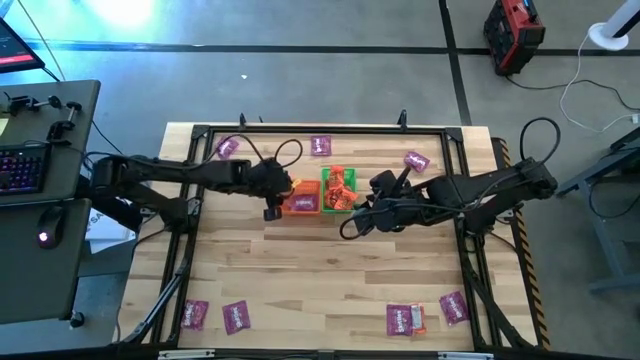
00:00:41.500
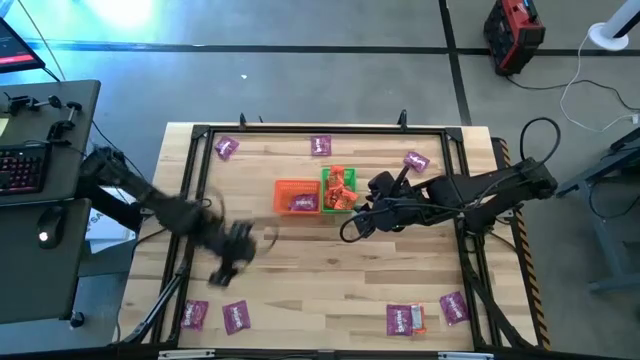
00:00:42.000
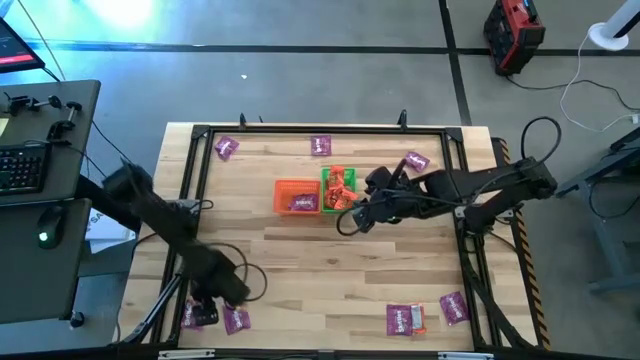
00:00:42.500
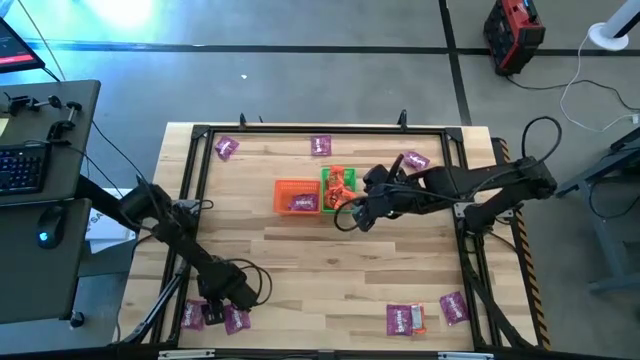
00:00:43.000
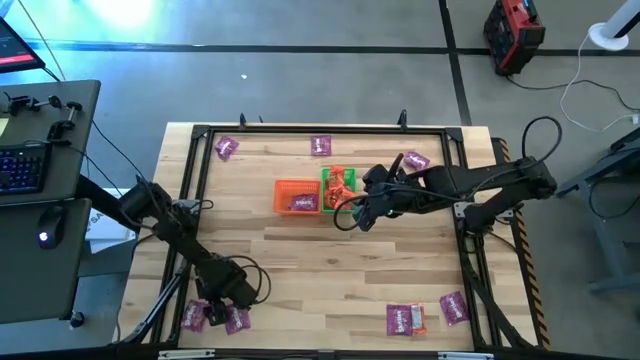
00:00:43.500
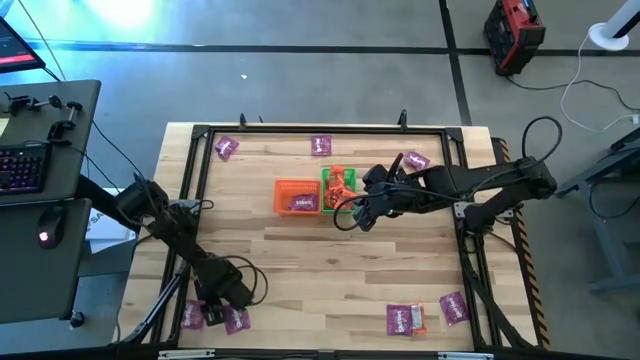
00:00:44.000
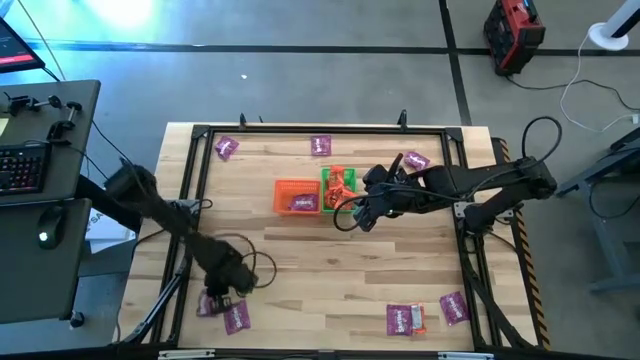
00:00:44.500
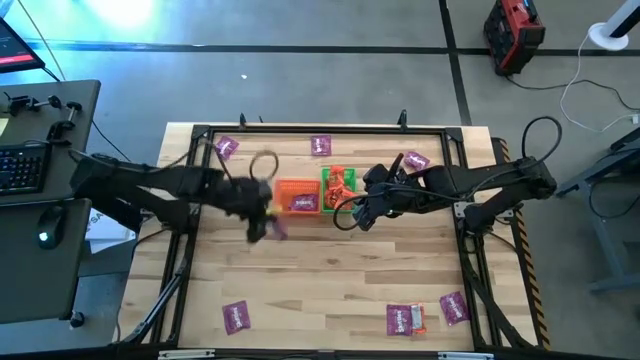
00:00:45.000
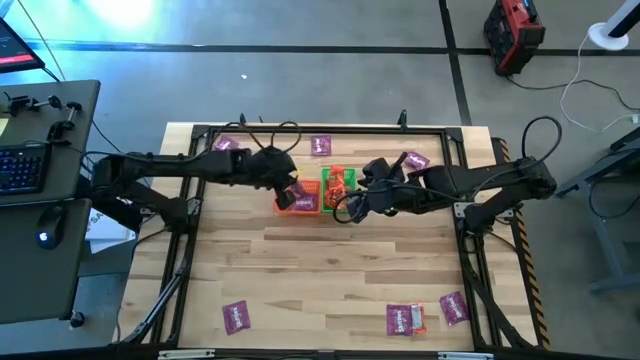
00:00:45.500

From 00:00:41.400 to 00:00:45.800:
Task: Sort candy by brand, put in halloween buckets
Put the violet candy into the orange bin

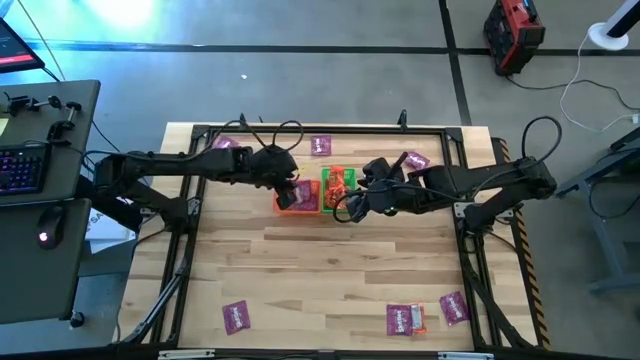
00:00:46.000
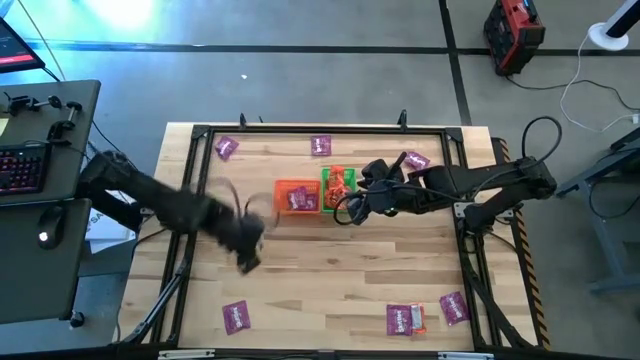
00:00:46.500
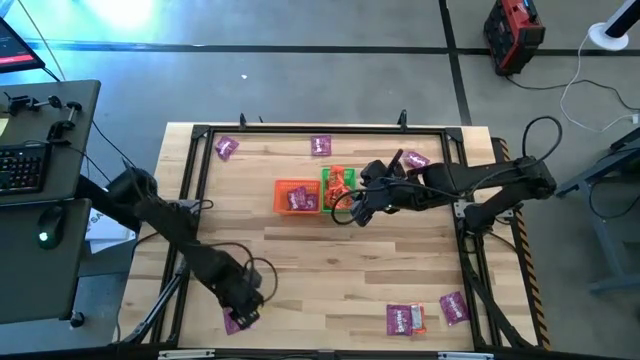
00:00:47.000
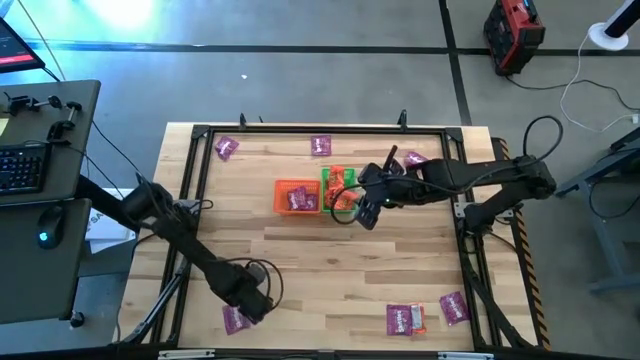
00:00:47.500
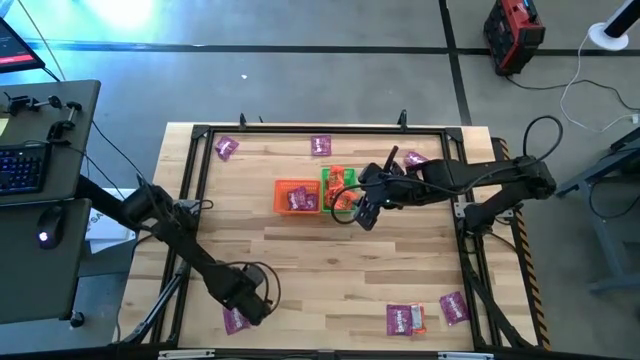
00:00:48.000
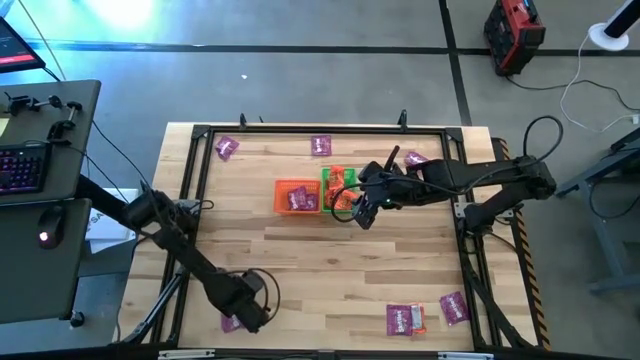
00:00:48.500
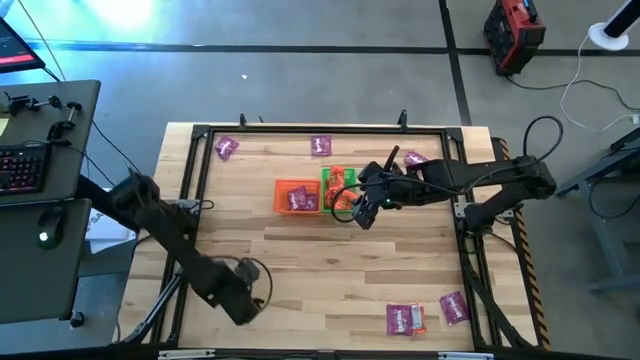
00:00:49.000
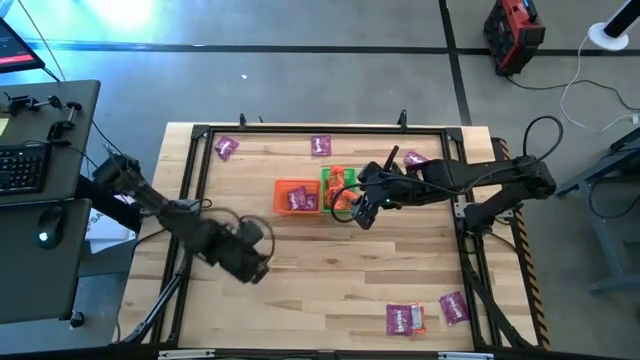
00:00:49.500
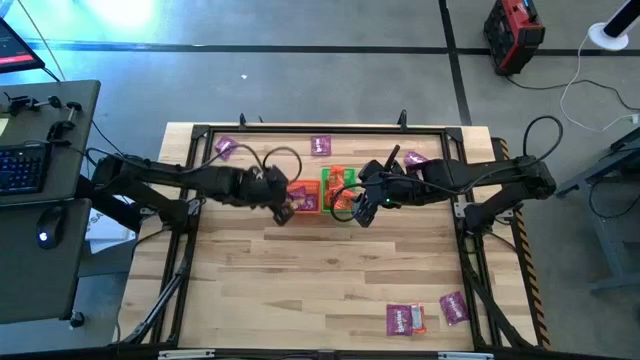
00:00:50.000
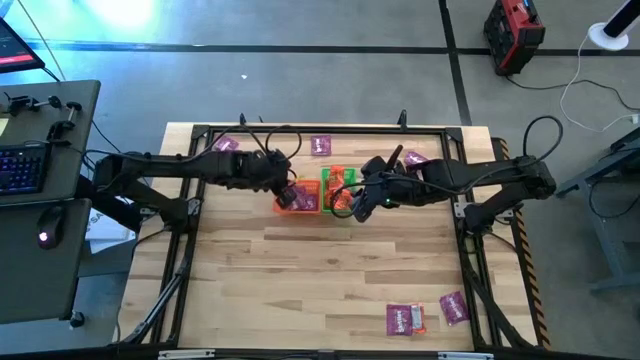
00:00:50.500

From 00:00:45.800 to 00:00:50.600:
Put the violet candy into the orange bin

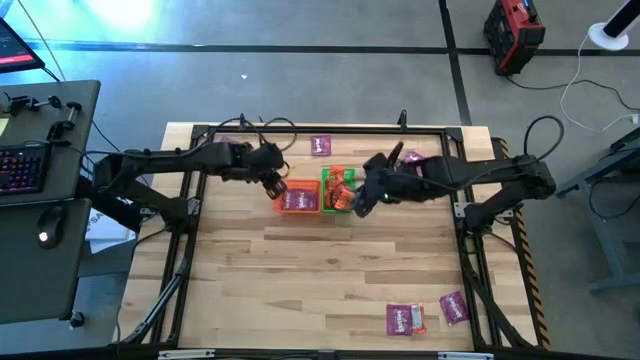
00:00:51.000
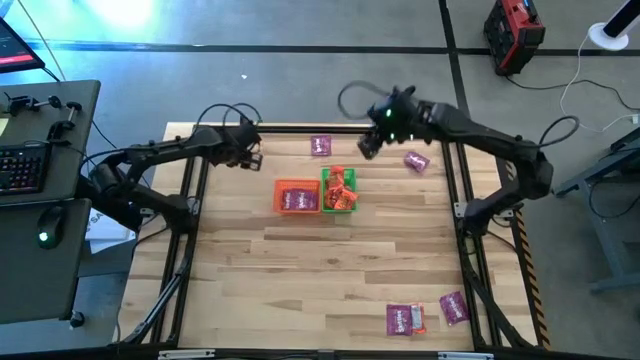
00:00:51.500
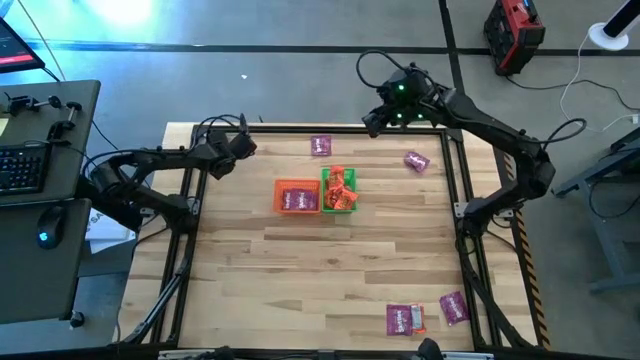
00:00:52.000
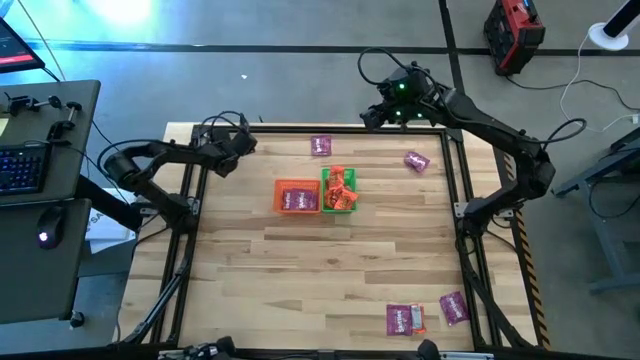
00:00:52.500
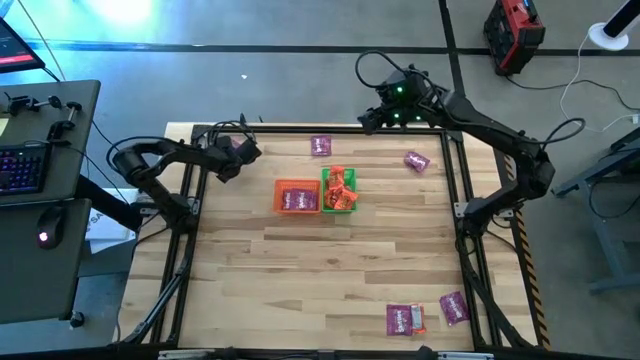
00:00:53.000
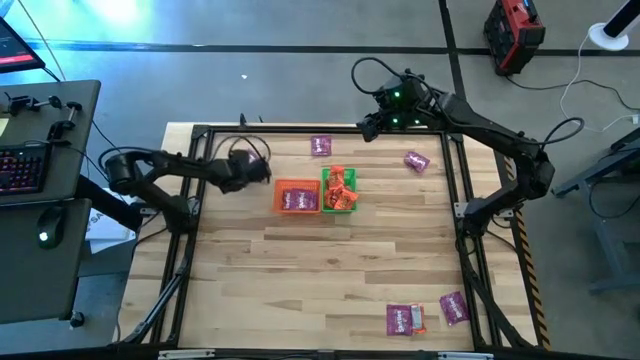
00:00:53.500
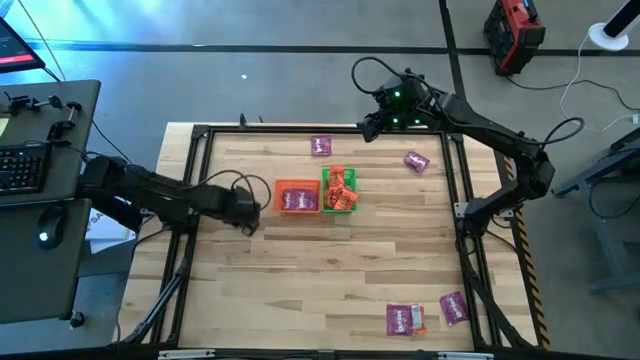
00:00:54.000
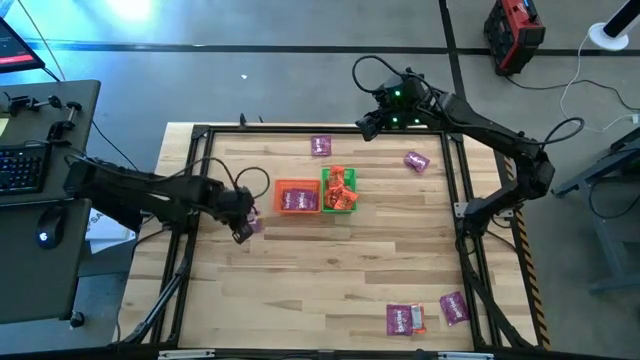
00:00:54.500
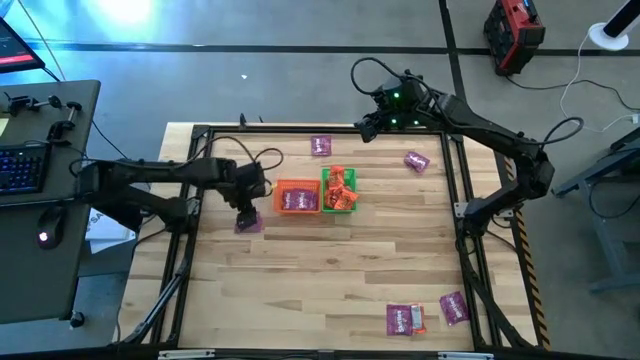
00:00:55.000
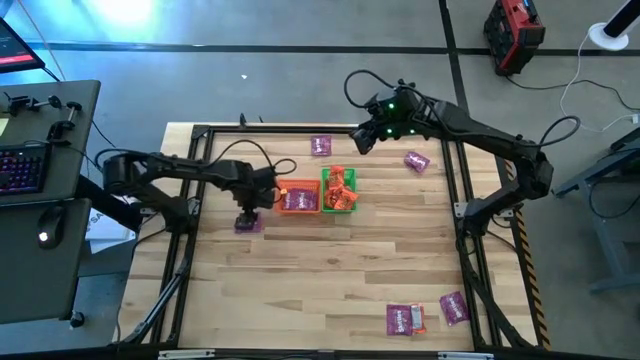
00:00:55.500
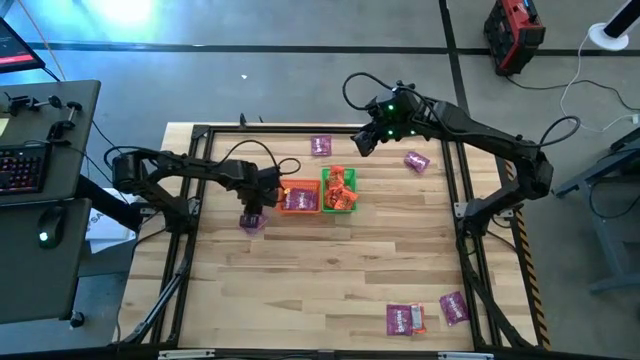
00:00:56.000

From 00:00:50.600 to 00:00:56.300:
Put the violet candy into the orange bin

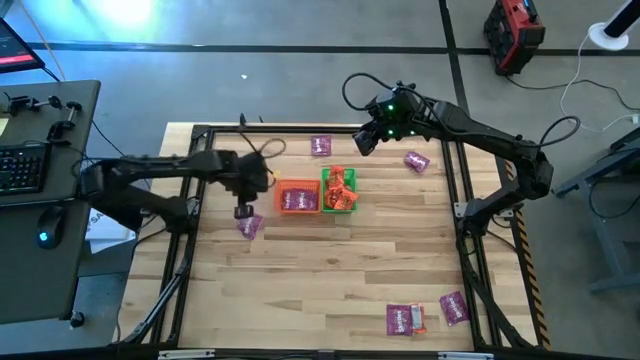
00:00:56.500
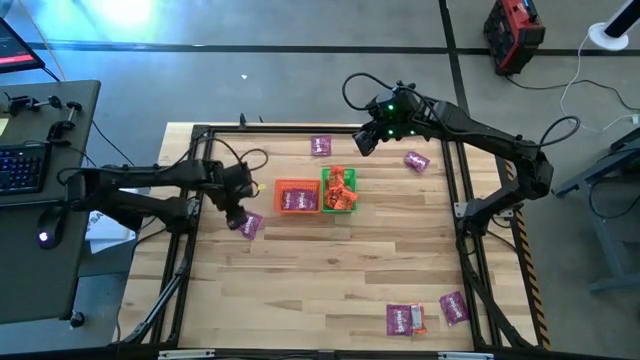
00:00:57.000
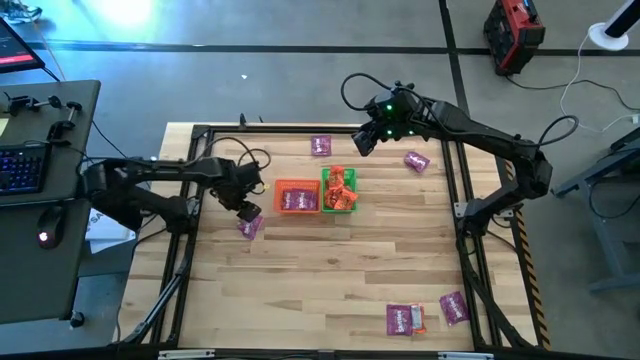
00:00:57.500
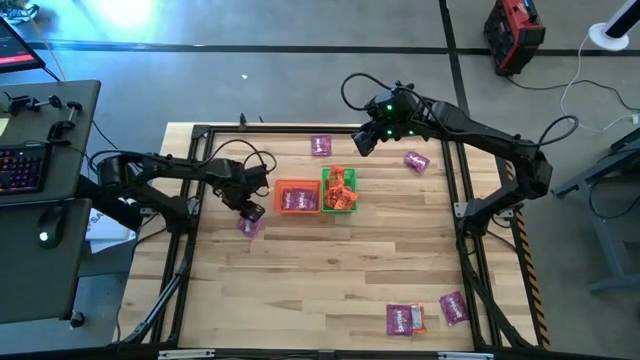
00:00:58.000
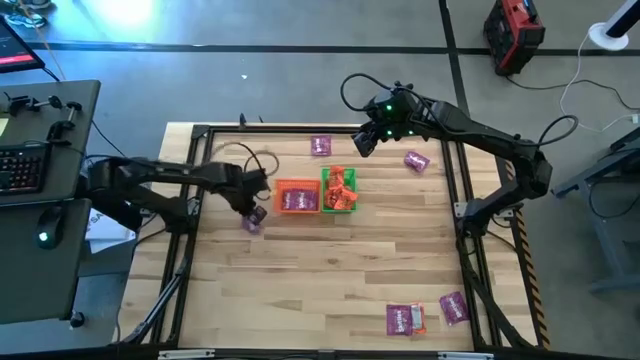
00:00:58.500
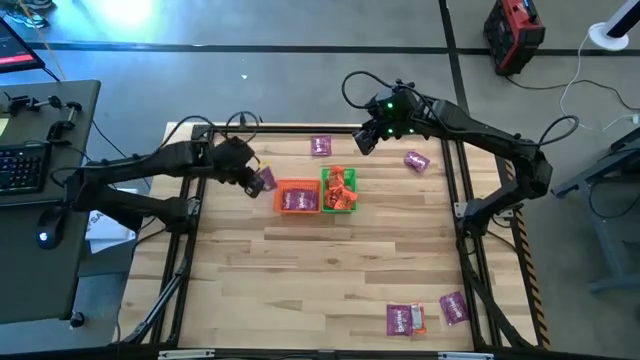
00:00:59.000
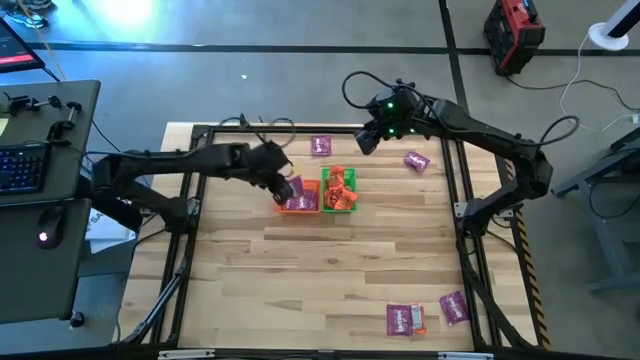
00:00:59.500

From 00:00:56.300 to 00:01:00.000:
Put the violet candy into the orange bin

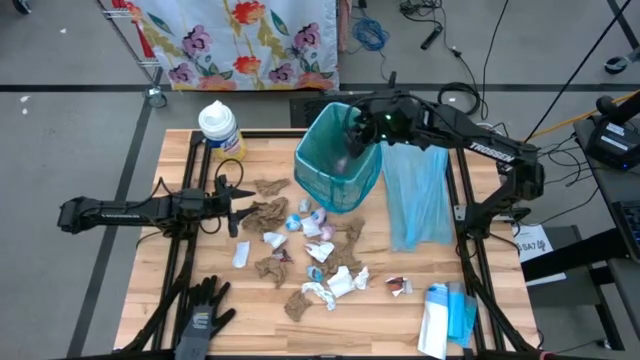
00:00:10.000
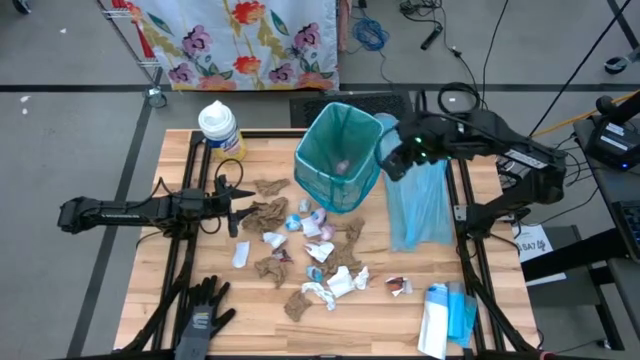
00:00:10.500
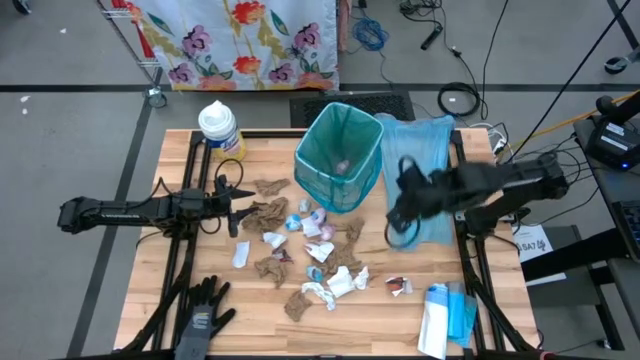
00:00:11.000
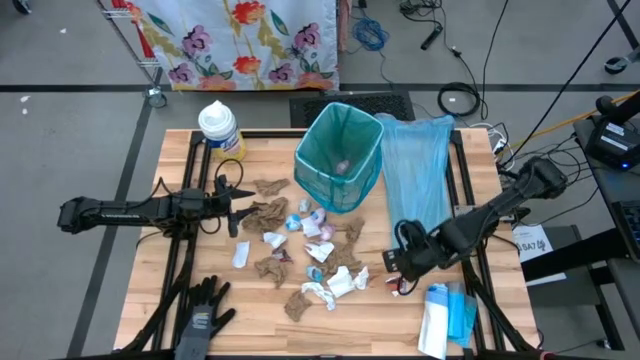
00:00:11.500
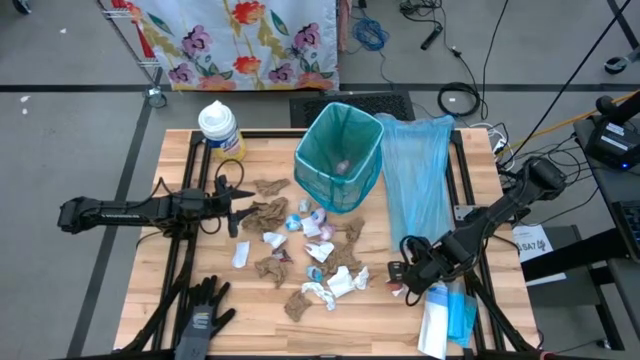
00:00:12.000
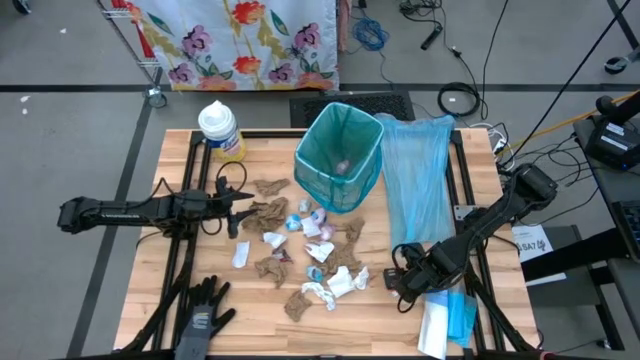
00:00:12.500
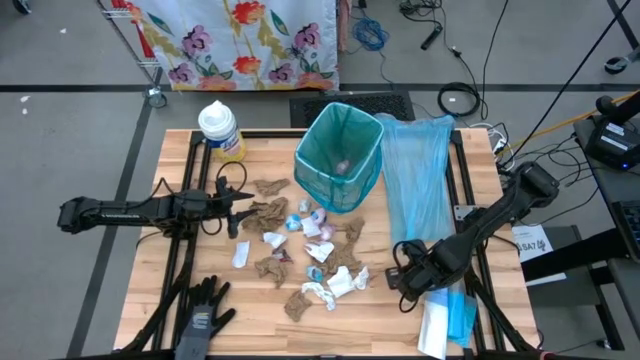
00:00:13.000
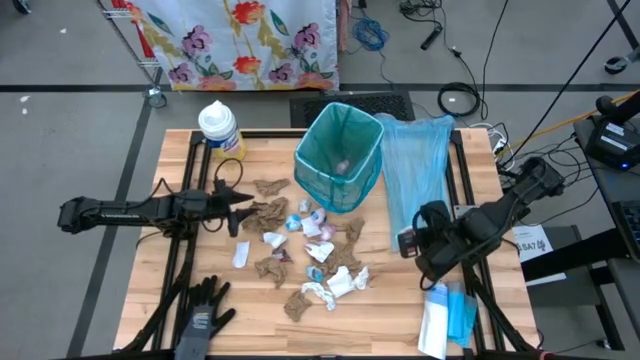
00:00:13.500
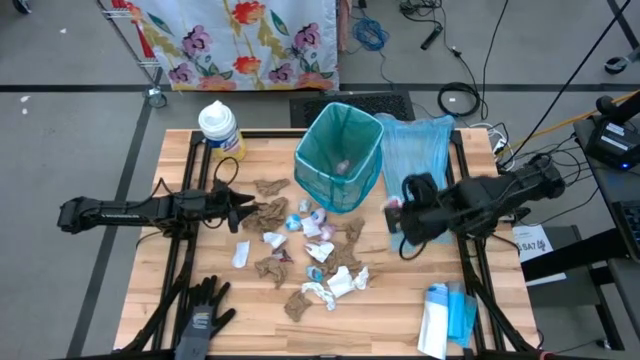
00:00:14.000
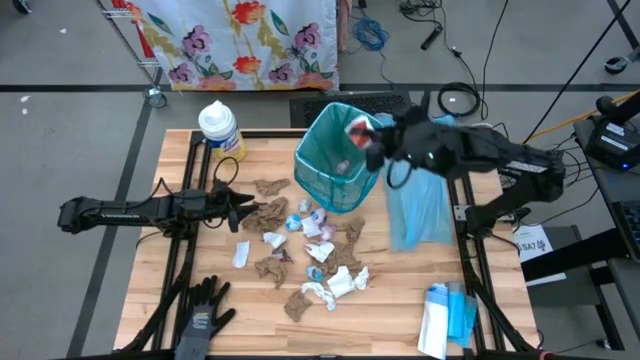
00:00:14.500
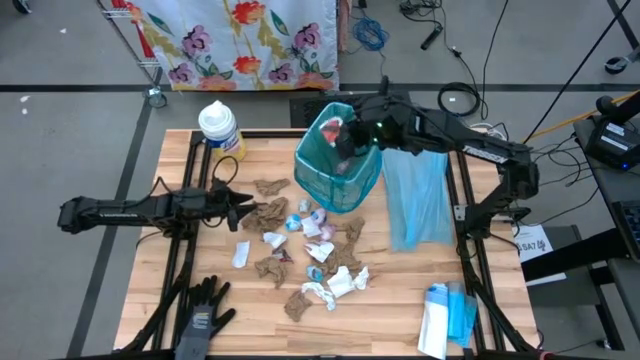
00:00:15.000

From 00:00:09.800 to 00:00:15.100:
Task: place trash/remove bag and relplace
Put the orange paper piece into the trash bin
